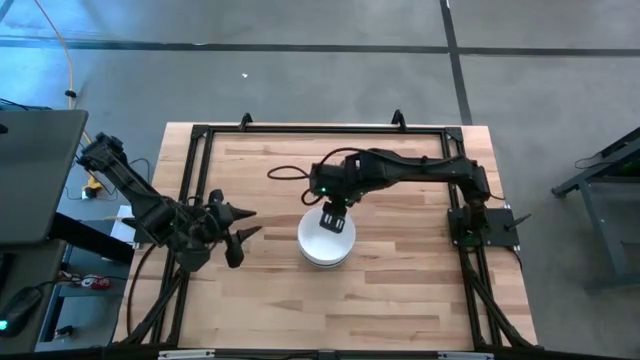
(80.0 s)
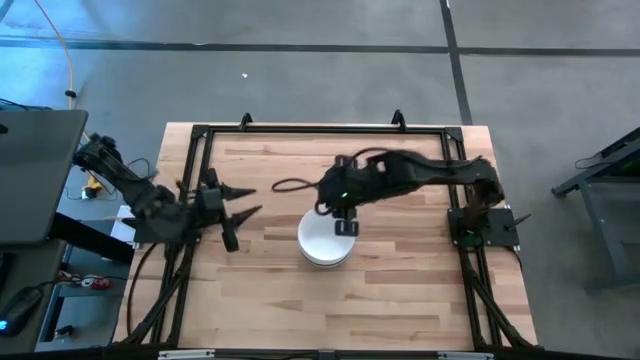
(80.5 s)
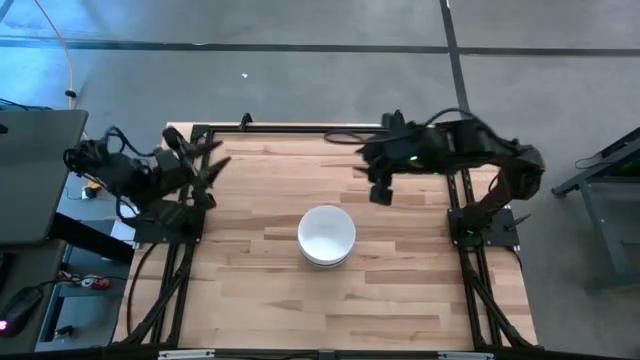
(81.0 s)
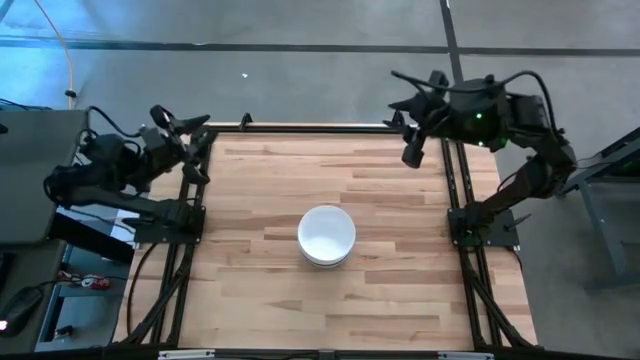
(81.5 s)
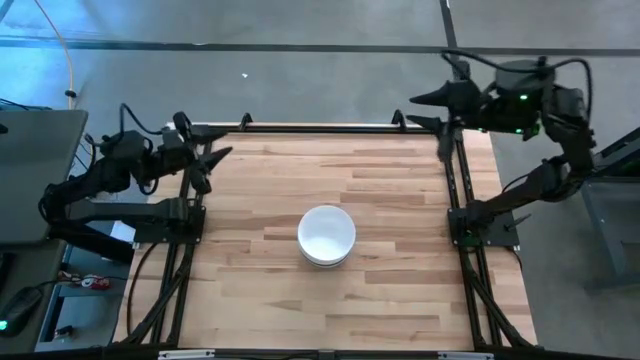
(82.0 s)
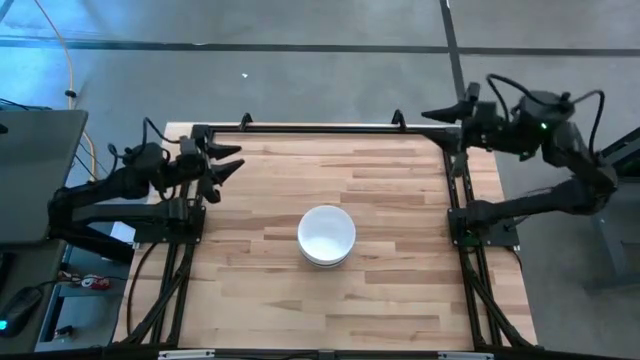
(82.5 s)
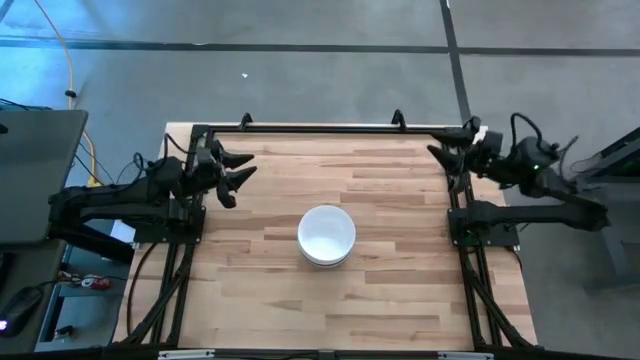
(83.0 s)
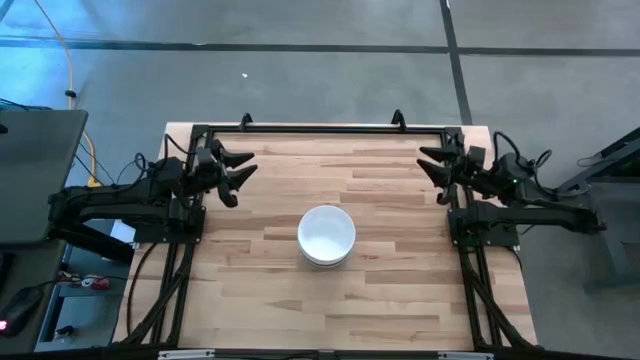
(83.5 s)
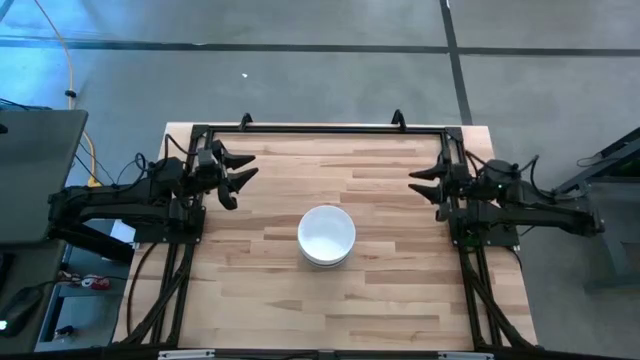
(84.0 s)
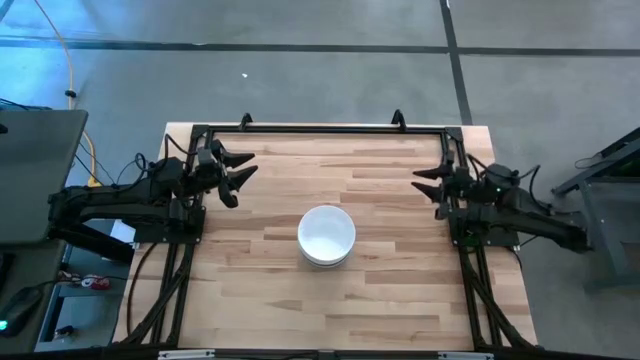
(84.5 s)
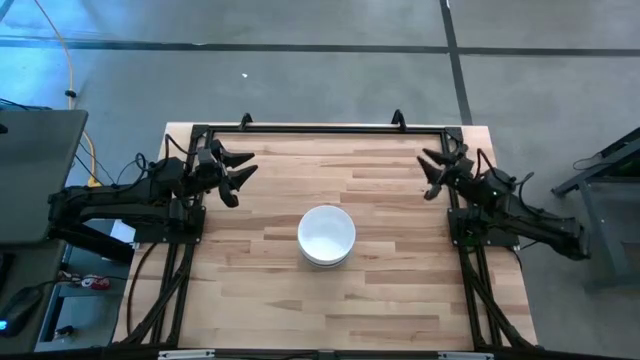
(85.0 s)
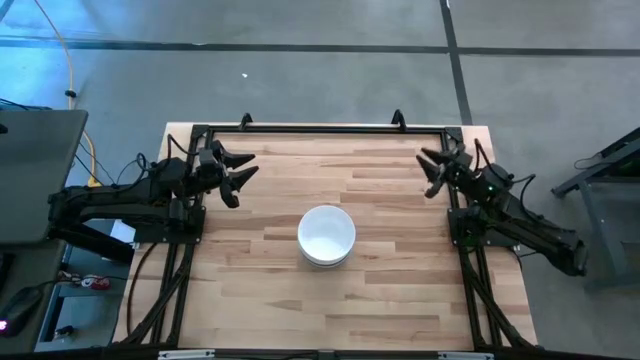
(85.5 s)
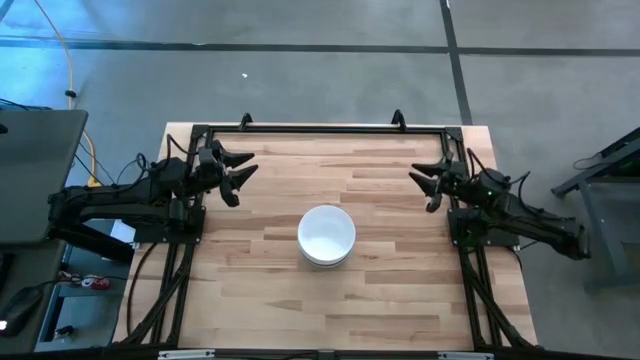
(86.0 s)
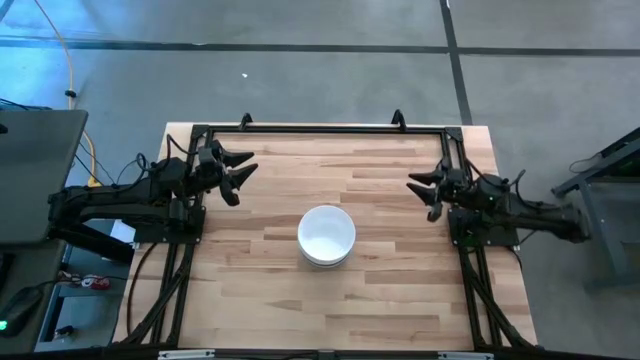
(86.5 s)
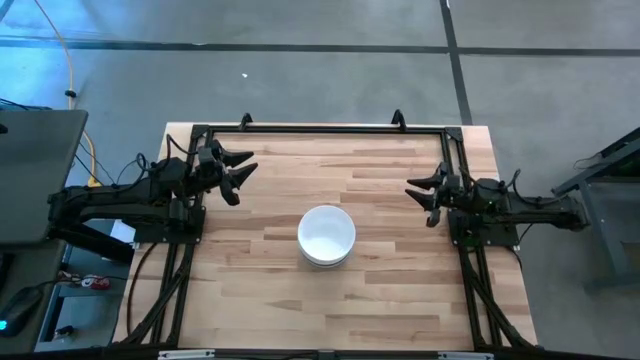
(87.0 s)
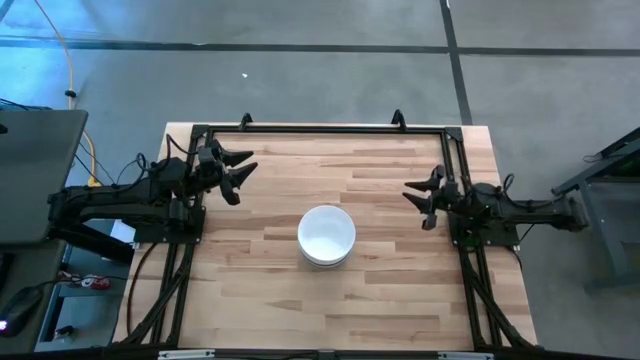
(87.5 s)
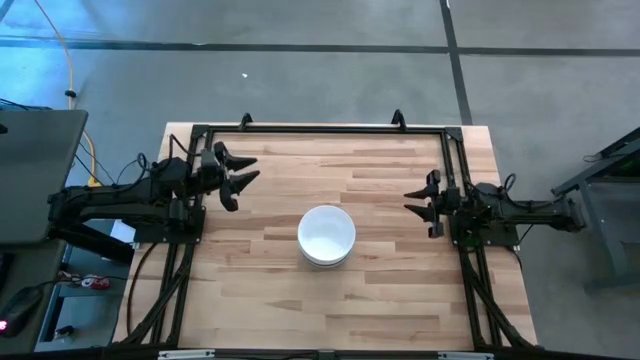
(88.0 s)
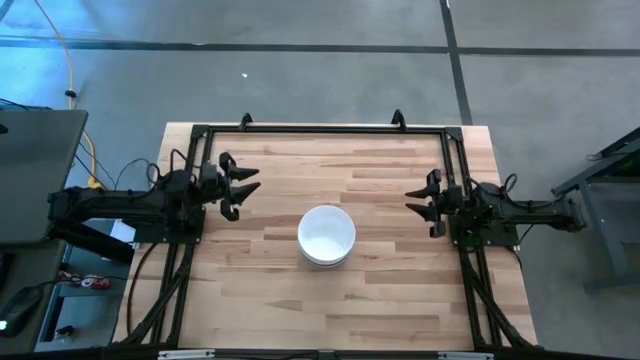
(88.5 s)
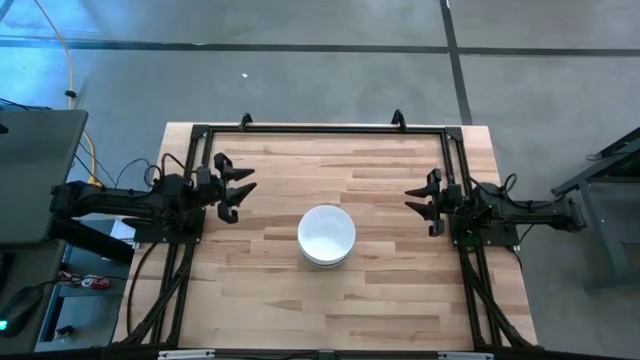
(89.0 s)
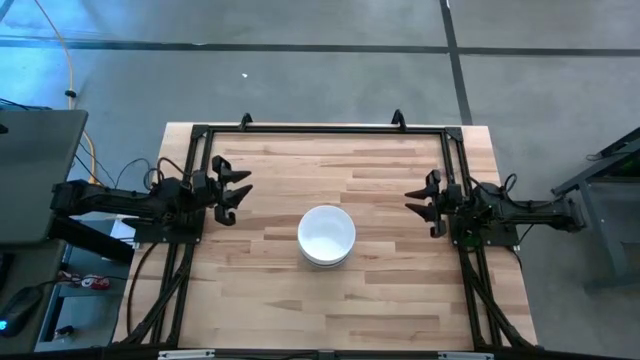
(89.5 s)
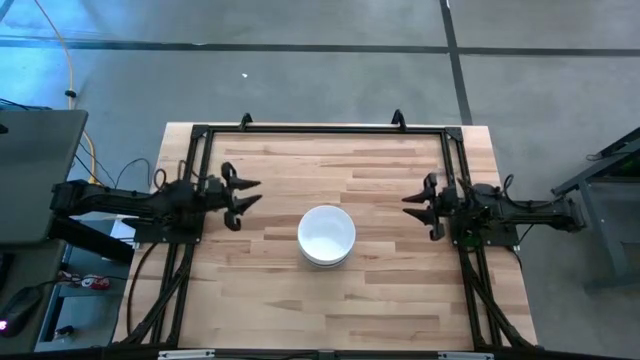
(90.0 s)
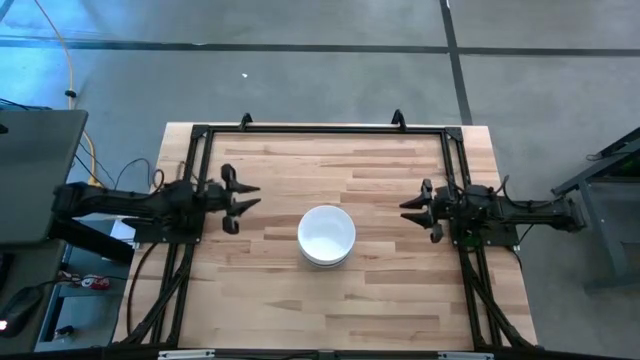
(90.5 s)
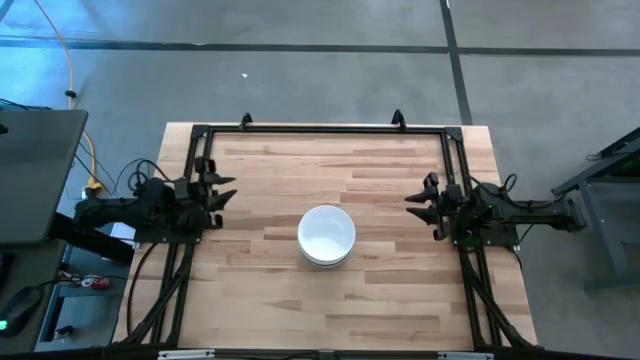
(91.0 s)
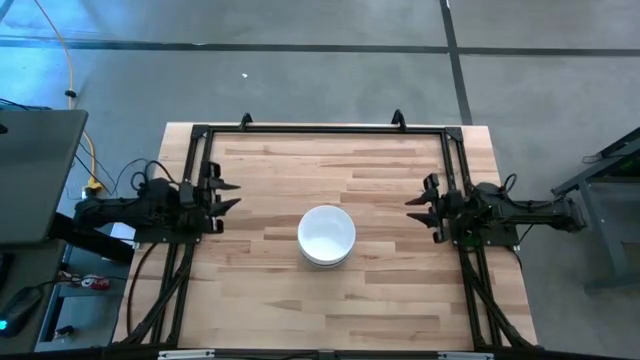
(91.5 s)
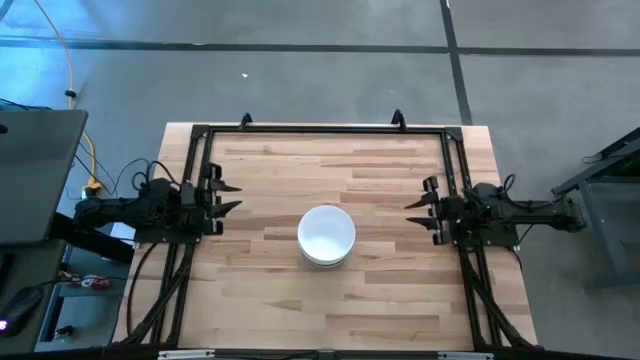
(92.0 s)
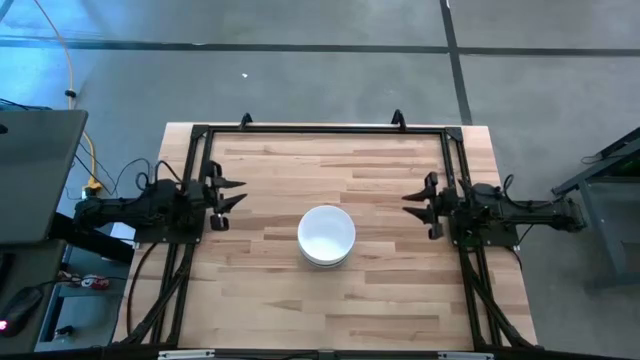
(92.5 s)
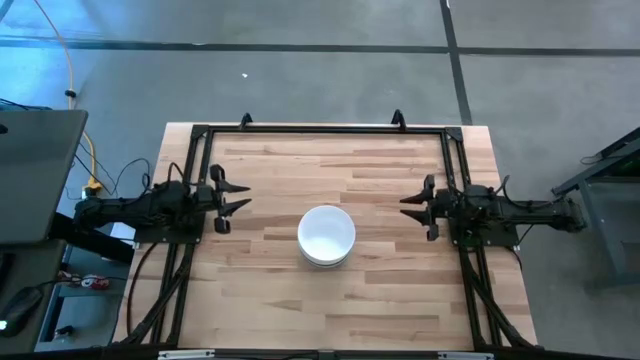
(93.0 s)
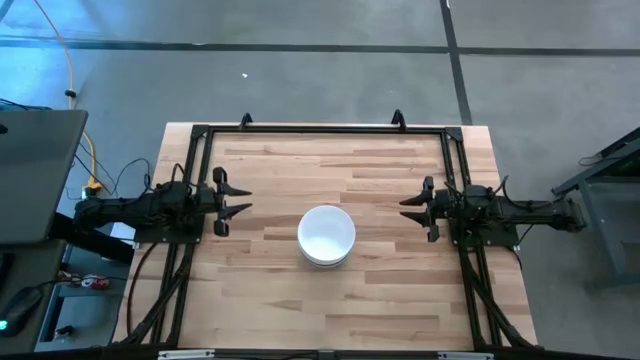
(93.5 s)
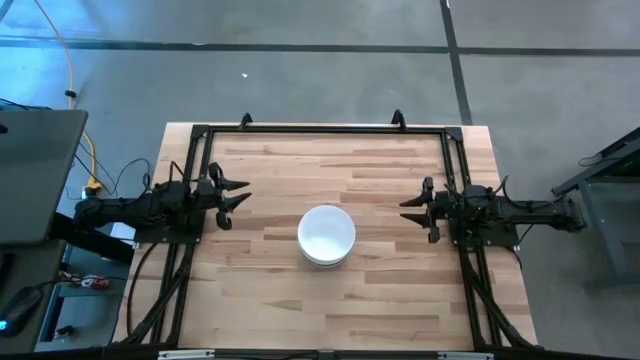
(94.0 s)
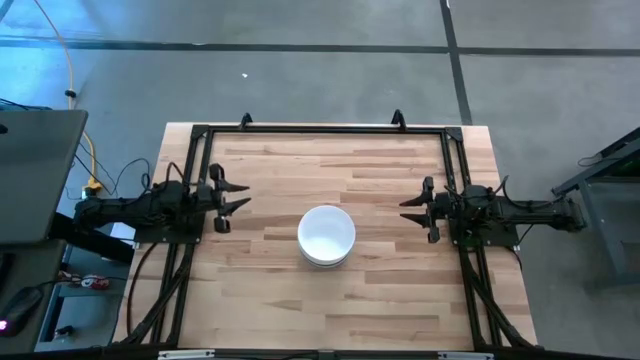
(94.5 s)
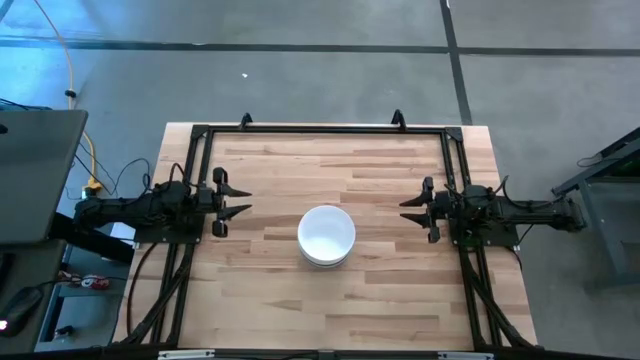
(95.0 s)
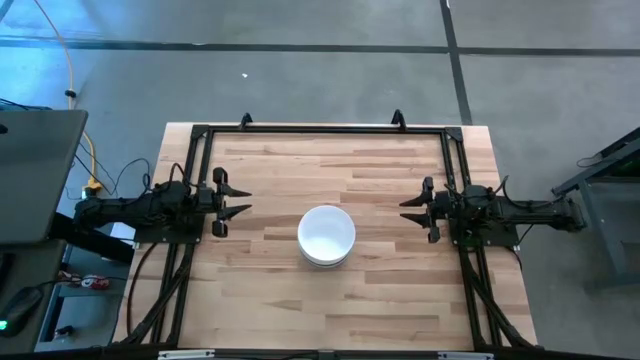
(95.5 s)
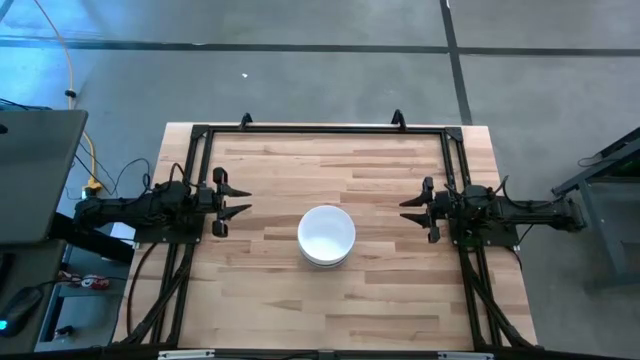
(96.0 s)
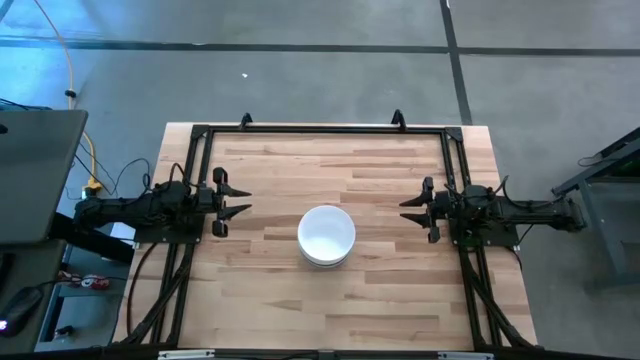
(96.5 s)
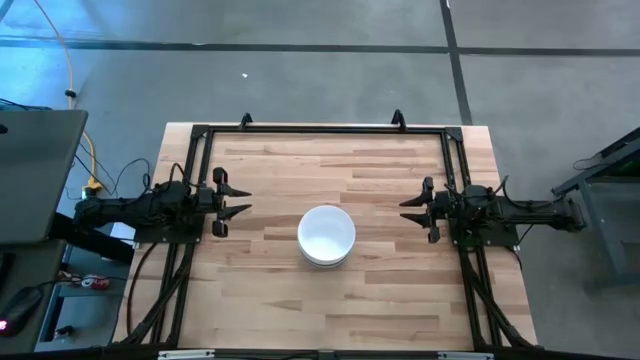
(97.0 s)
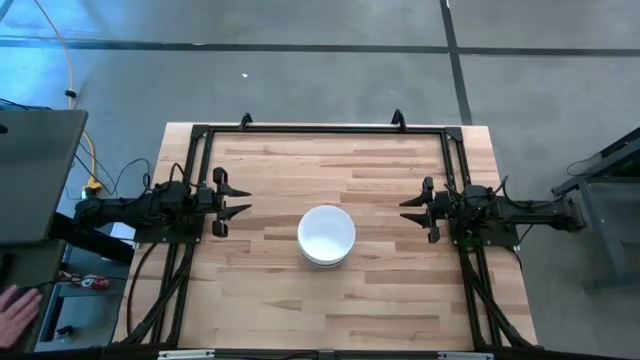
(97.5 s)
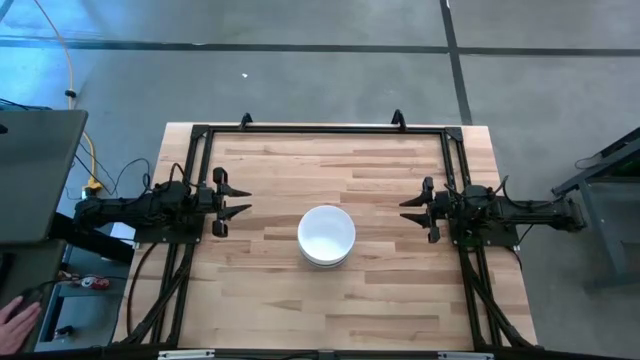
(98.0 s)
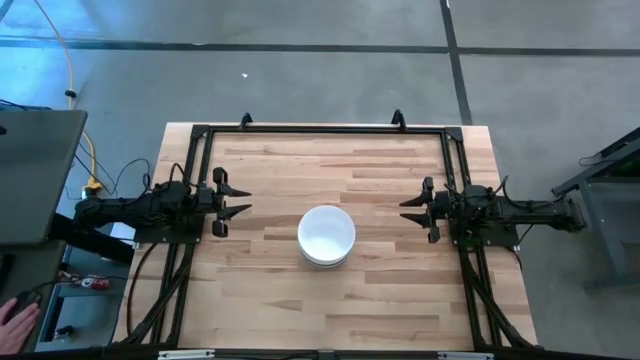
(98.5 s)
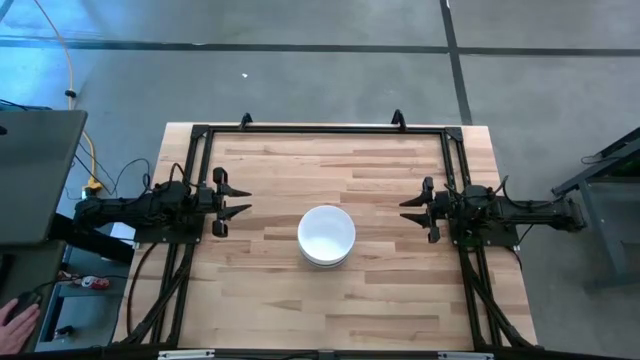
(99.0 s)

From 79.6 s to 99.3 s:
Task: Nest bowls inside each other
Return to Home Position

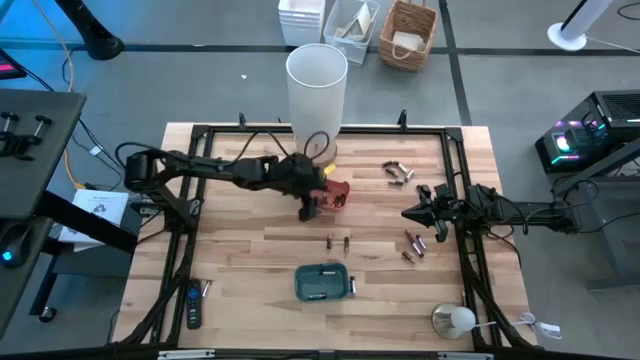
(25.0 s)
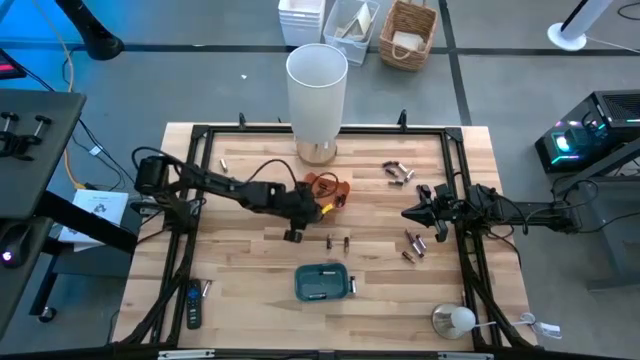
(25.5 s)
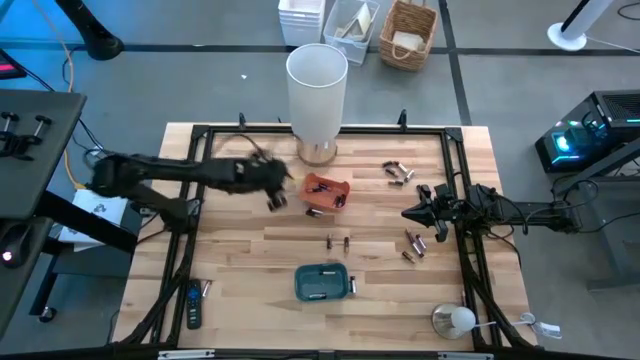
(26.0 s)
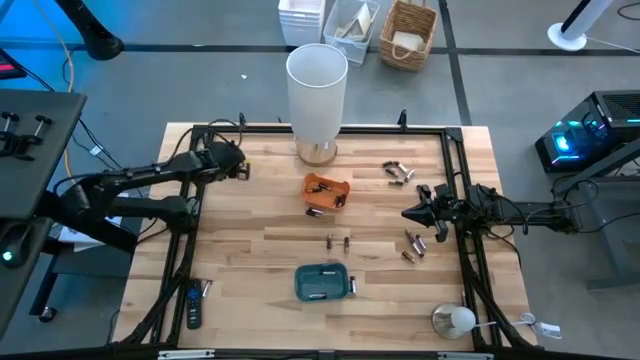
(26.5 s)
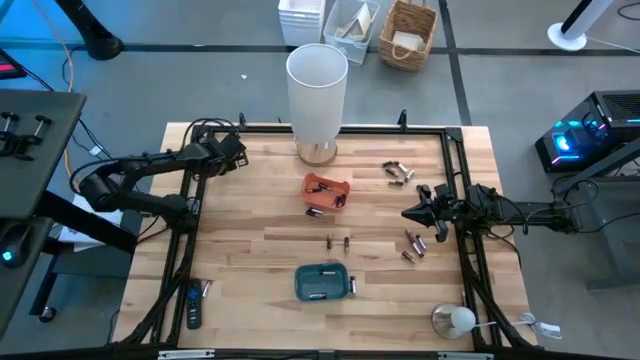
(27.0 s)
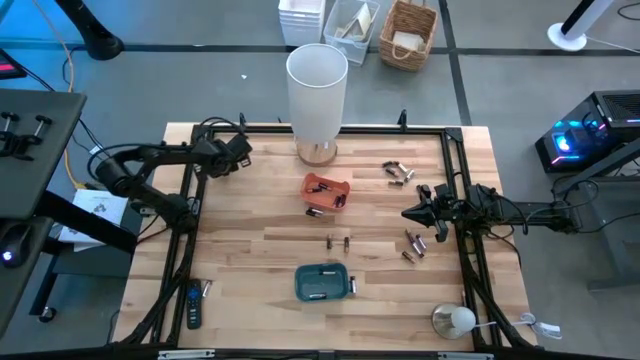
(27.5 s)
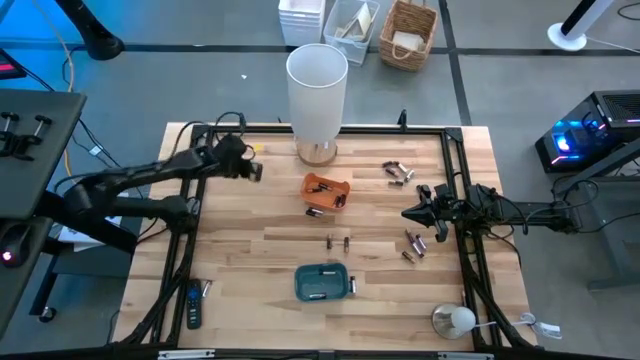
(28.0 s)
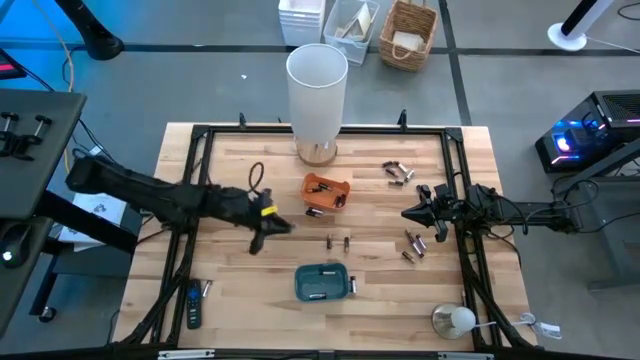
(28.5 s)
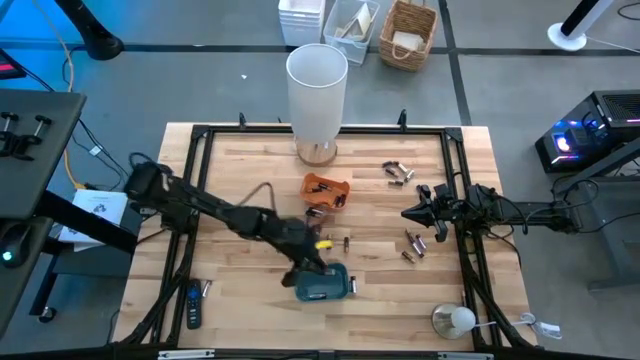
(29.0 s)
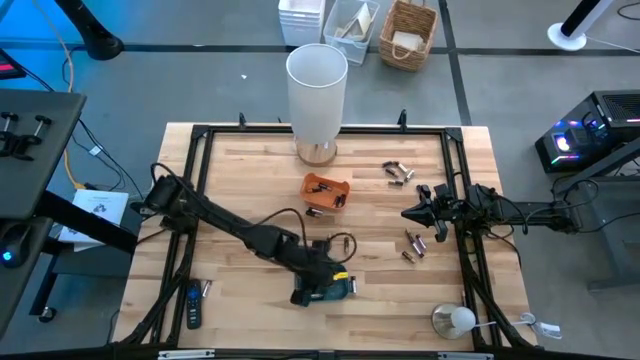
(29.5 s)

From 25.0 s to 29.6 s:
Task: Sort batteries
Put the silver battery into the blue bin
